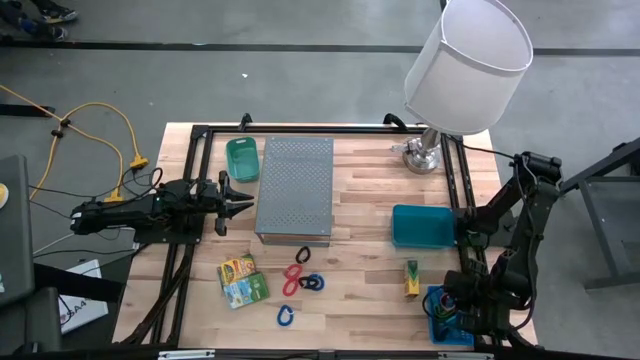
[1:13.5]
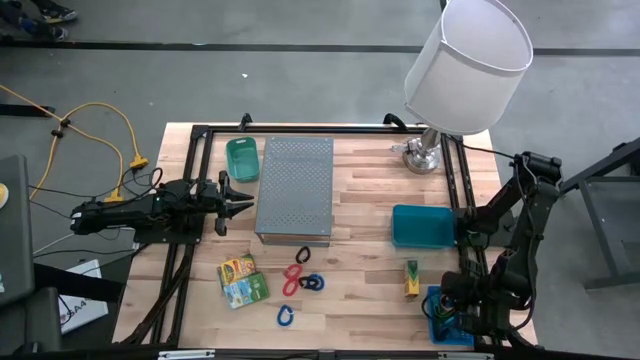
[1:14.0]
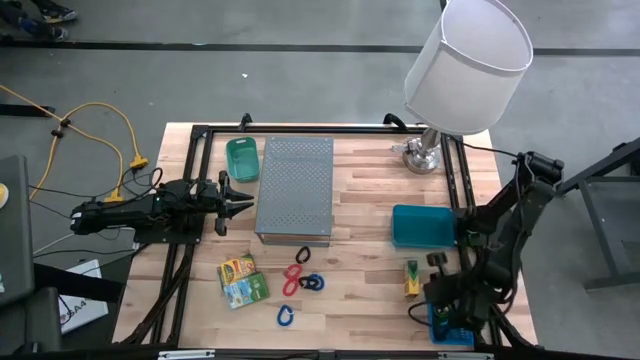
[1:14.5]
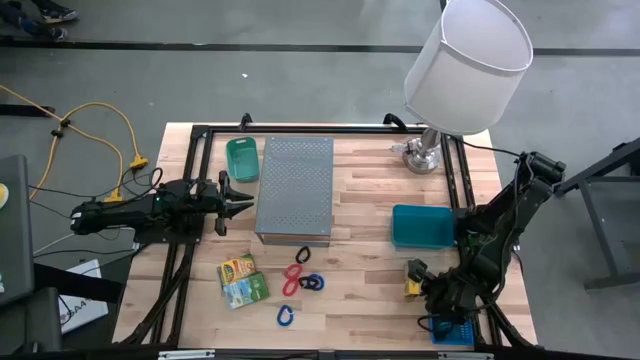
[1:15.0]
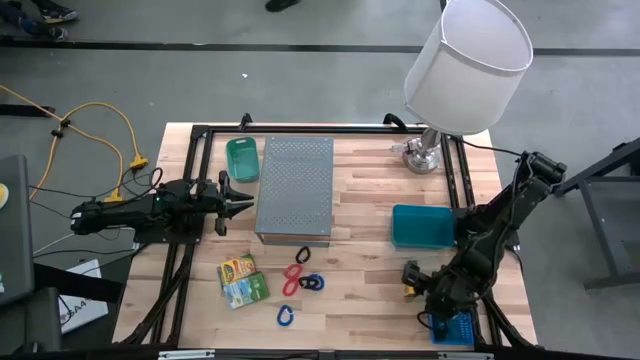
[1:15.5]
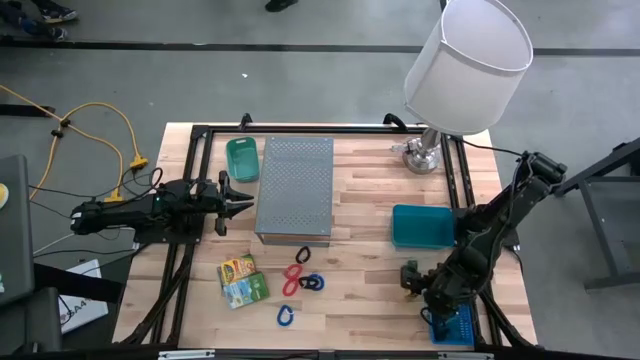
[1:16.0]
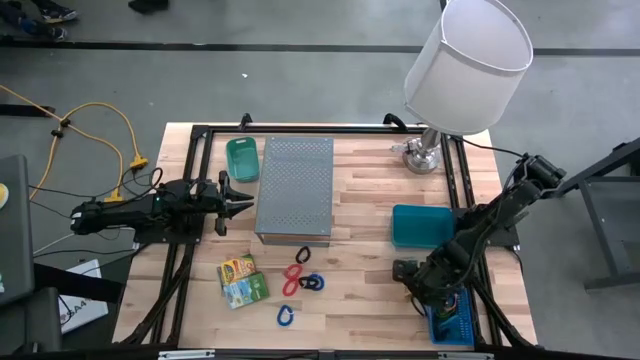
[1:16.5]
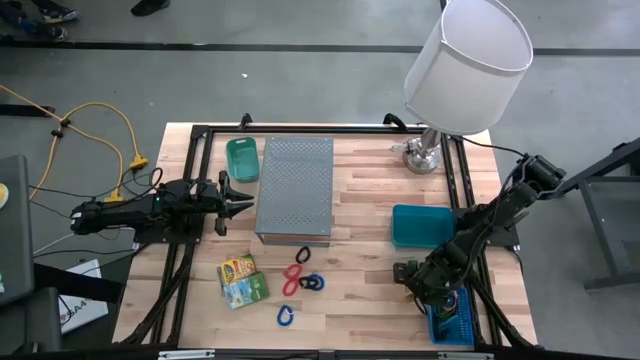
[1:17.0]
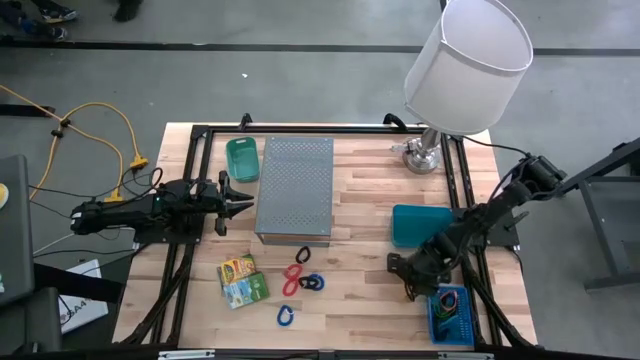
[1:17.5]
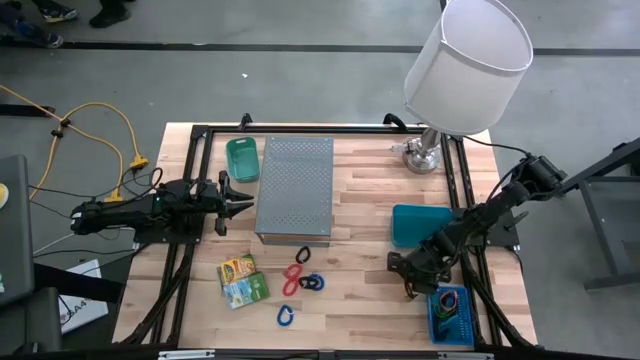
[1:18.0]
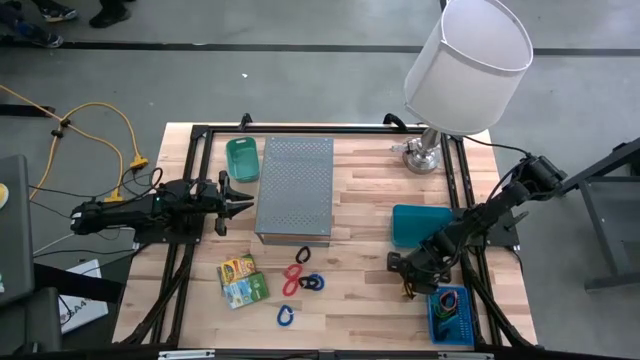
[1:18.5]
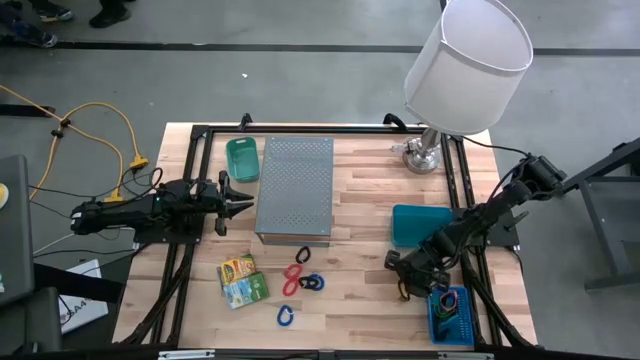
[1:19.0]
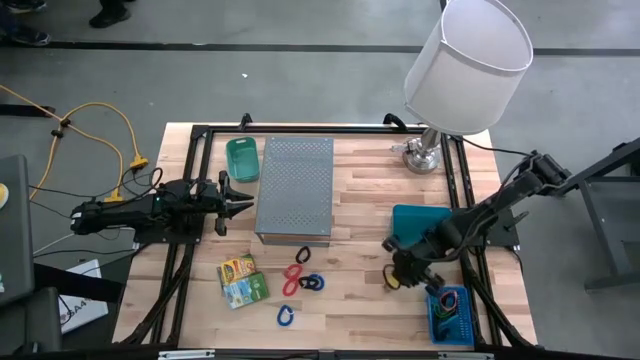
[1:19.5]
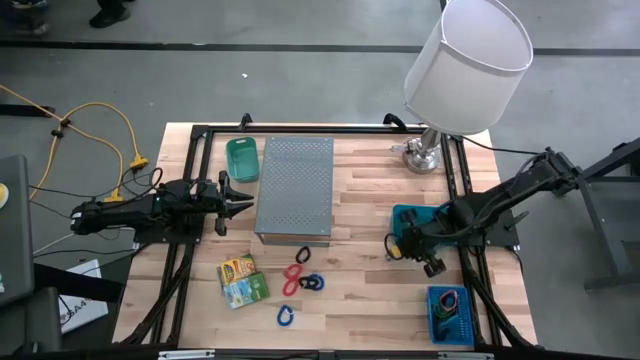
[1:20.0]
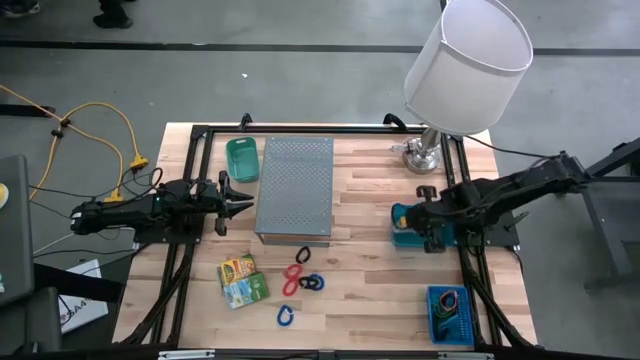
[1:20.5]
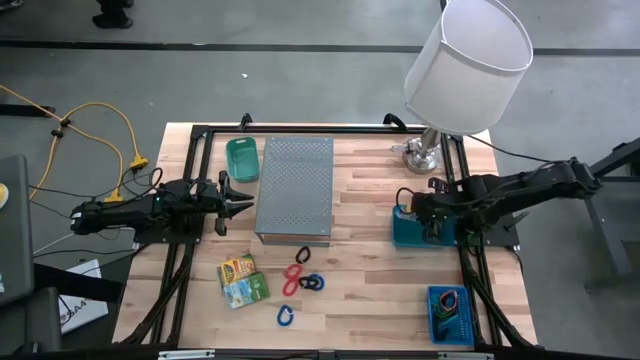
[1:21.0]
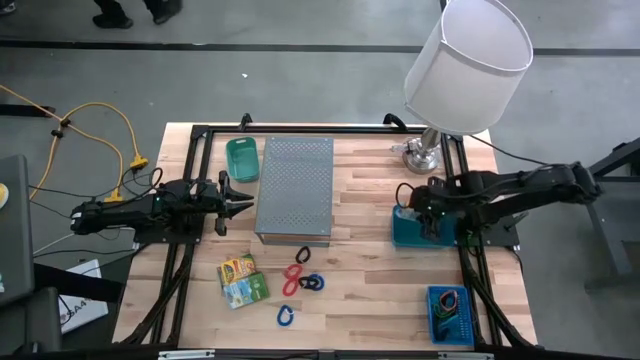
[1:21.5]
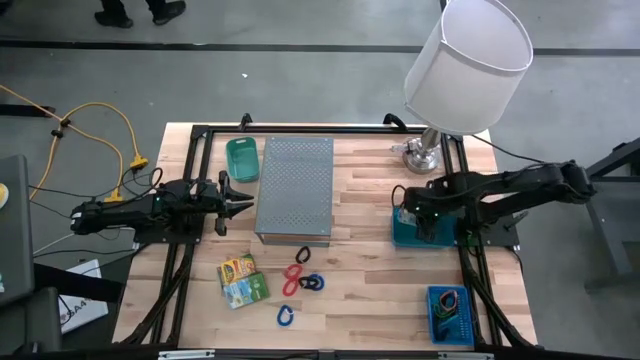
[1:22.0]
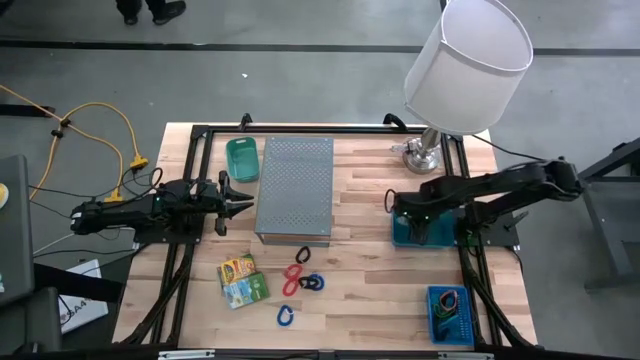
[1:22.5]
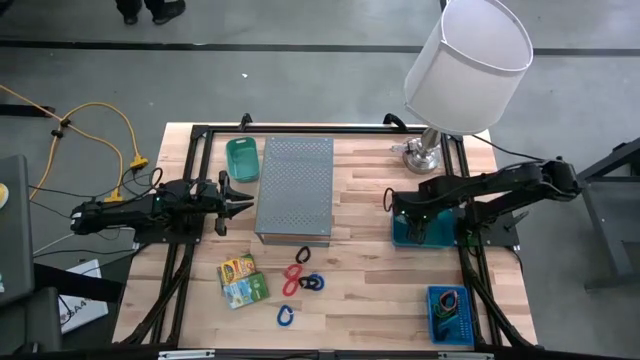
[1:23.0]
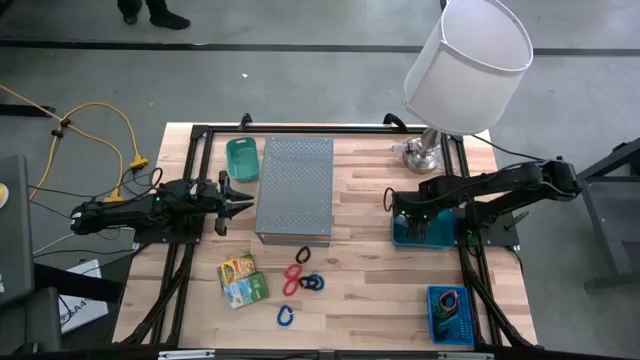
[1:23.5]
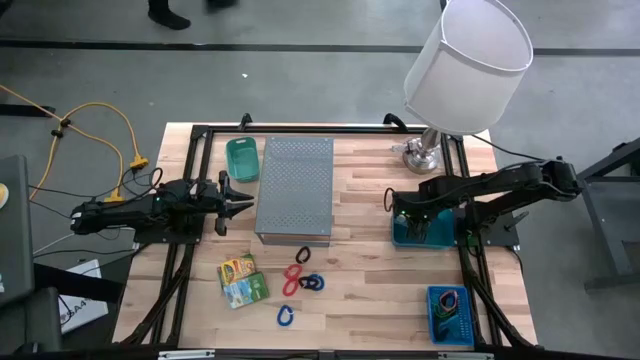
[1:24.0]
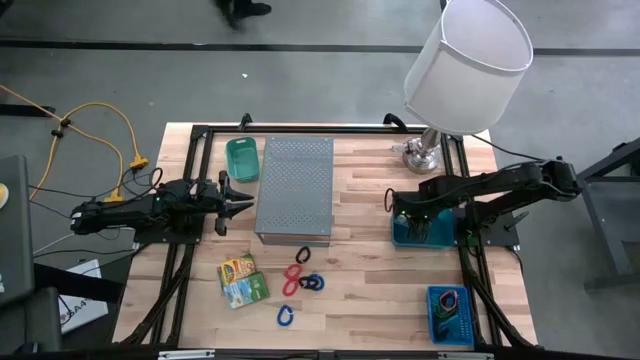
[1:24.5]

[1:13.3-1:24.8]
Task: Pick & Place Office Desk Supplies
Put the right crayon box into the blue bin

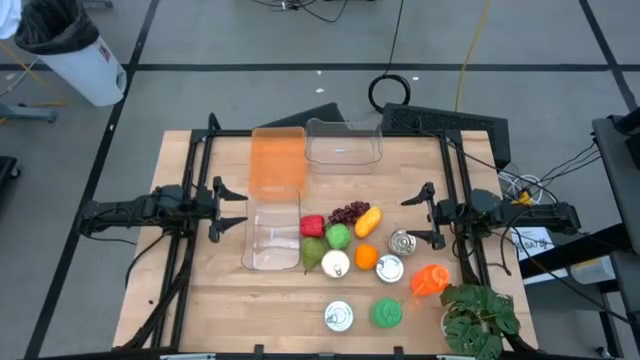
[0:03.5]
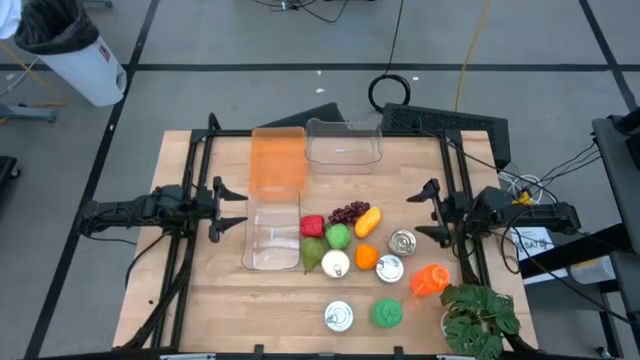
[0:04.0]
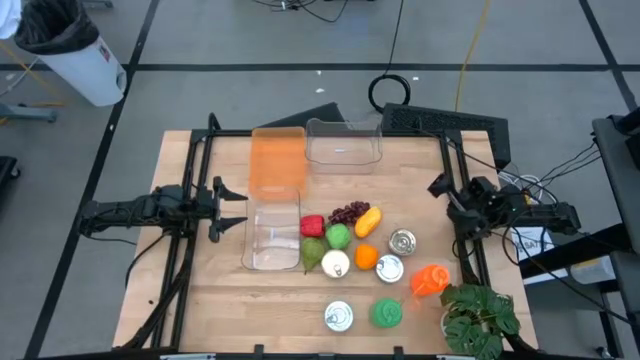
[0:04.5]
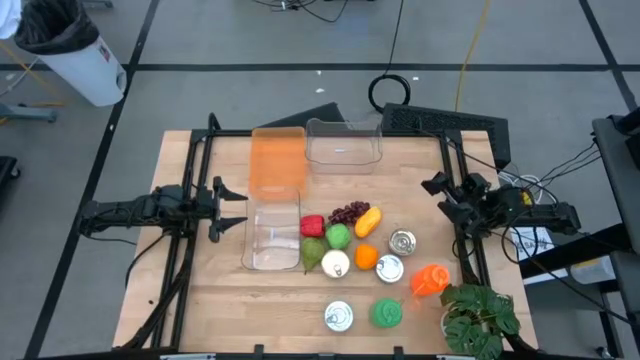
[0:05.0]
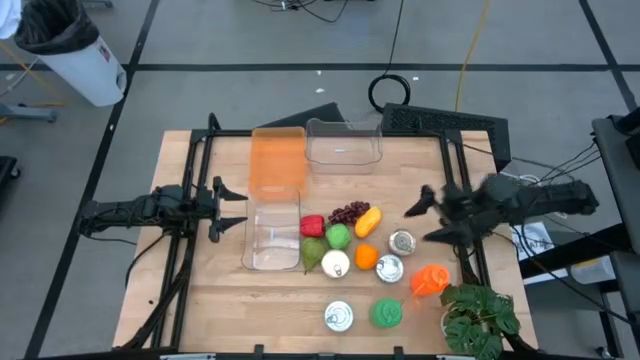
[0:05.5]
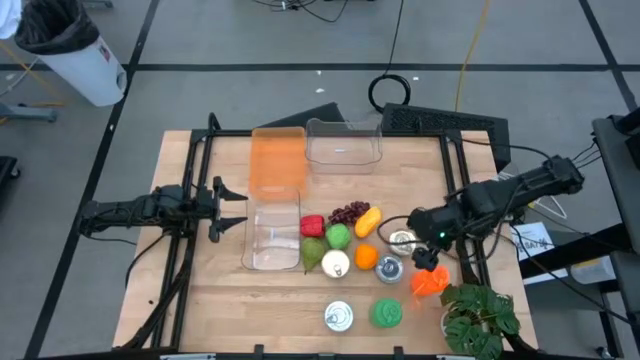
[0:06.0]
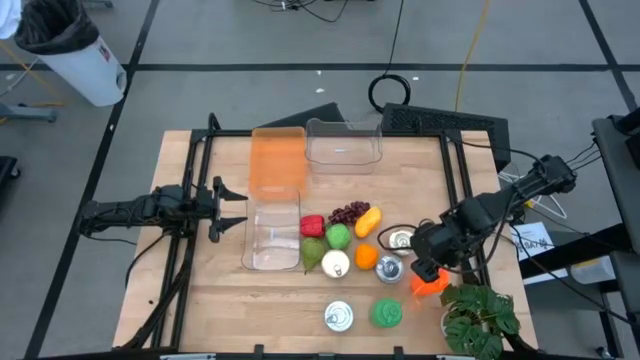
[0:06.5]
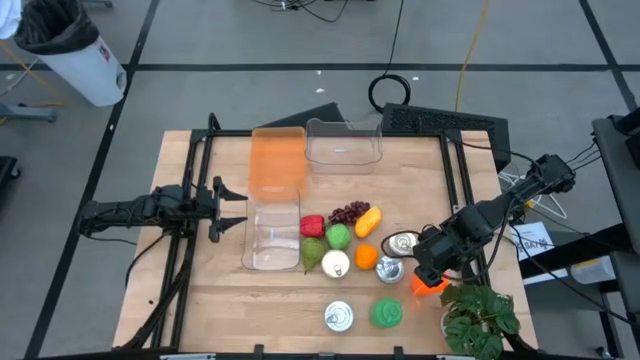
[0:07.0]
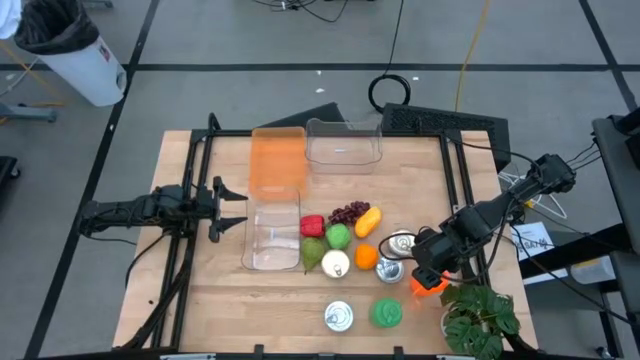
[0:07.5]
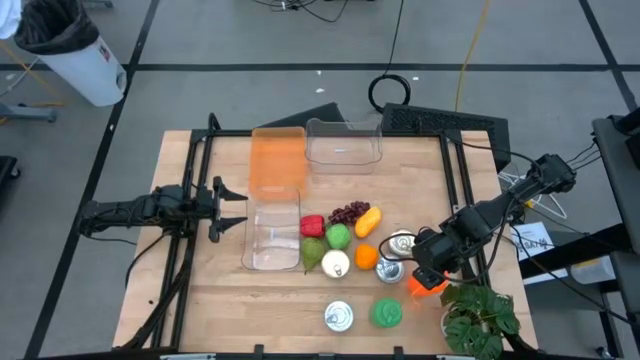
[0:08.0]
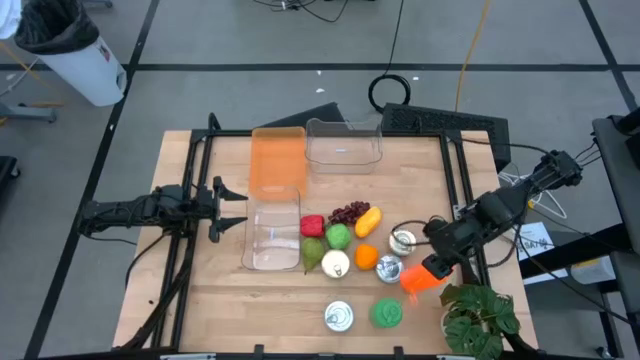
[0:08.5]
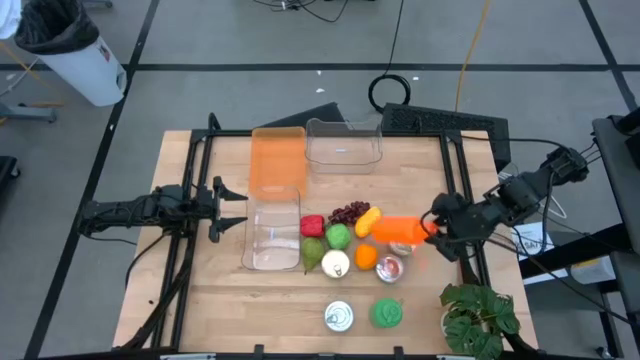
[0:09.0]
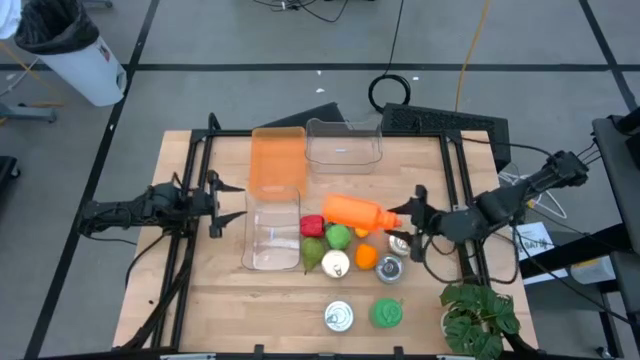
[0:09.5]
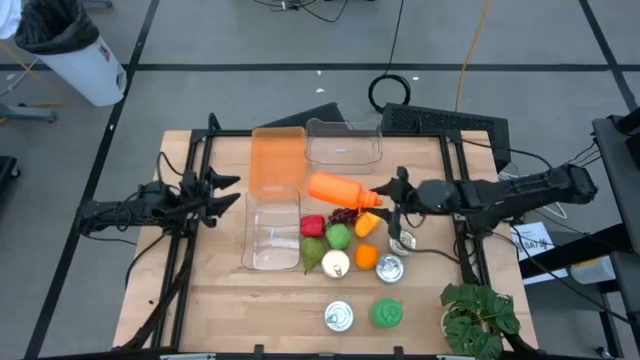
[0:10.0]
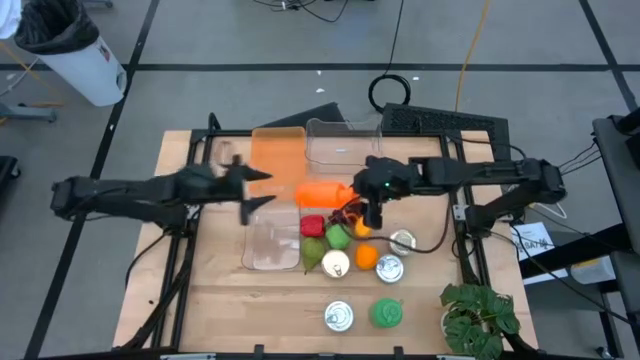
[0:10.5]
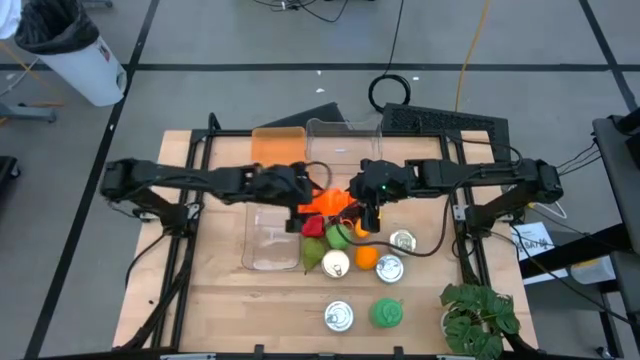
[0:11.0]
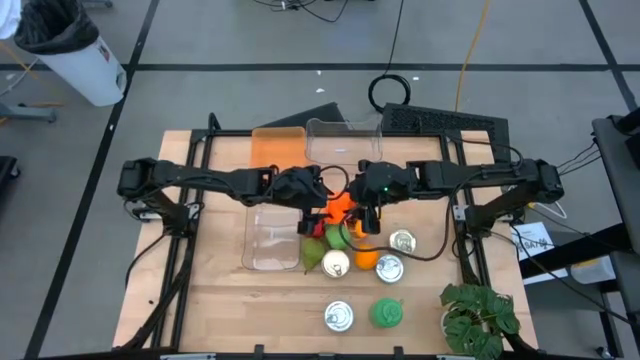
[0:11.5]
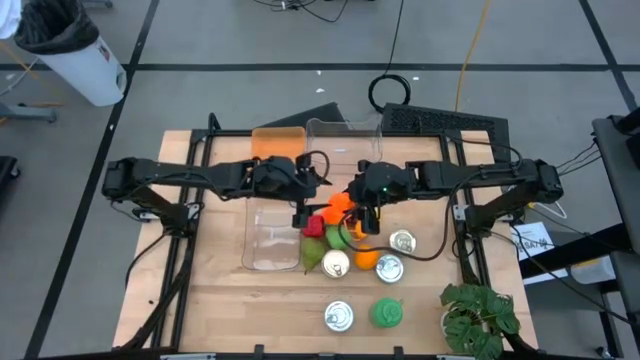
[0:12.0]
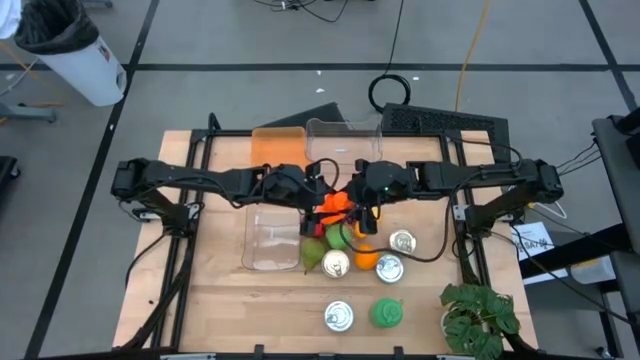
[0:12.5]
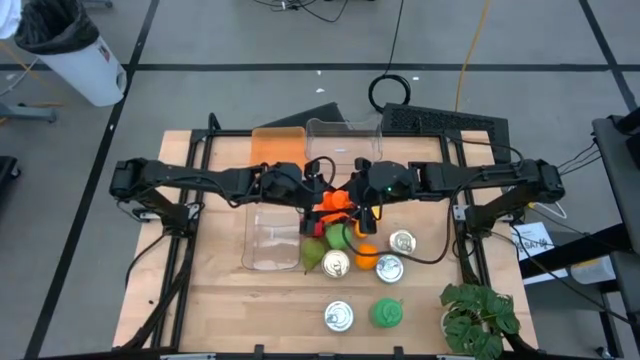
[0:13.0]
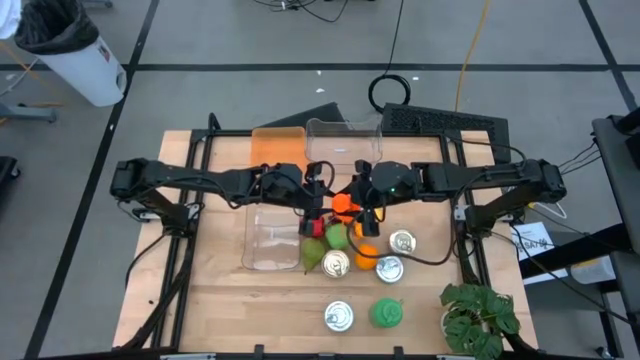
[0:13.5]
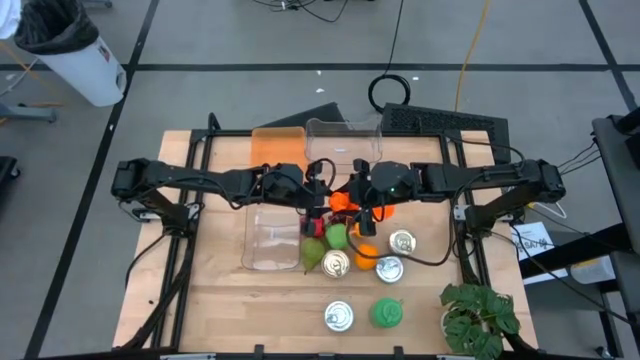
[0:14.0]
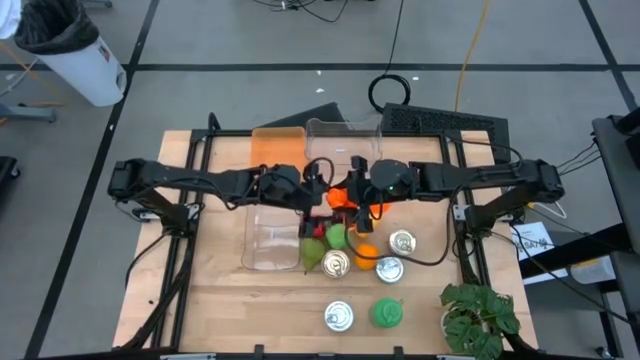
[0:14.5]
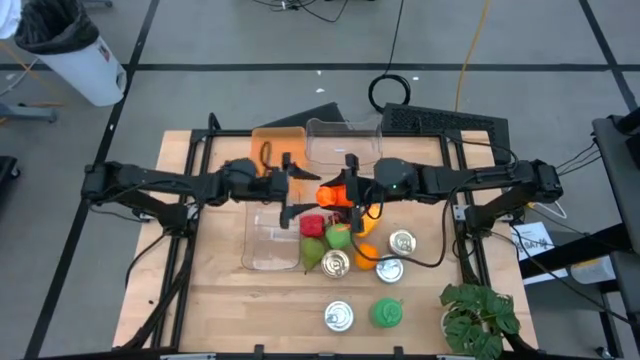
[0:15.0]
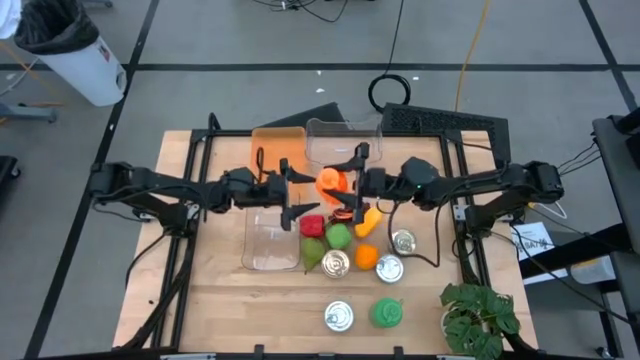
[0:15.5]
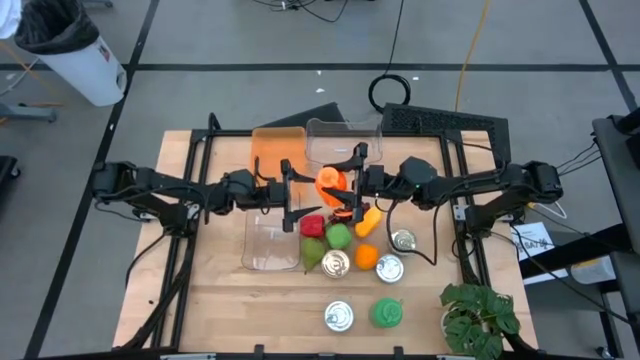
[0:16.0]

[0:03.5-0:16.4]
Task: Pick & Place Food Item
Put the orange tumbler into the orange bin
